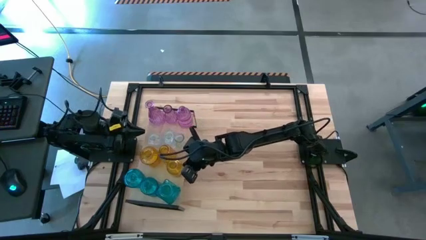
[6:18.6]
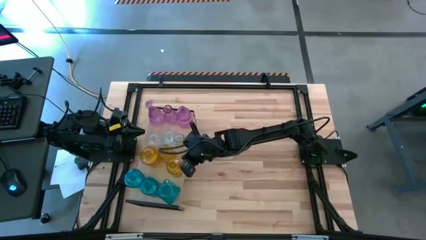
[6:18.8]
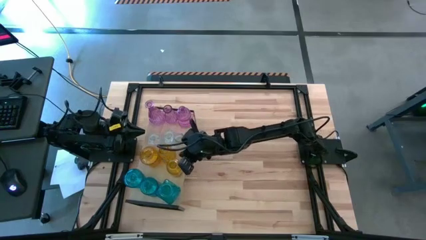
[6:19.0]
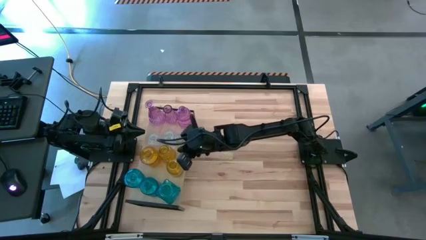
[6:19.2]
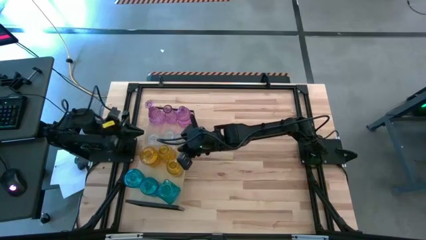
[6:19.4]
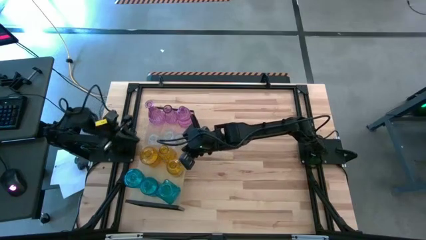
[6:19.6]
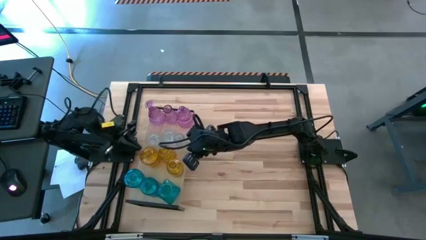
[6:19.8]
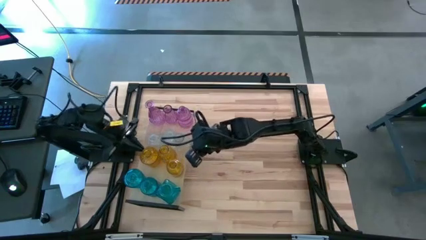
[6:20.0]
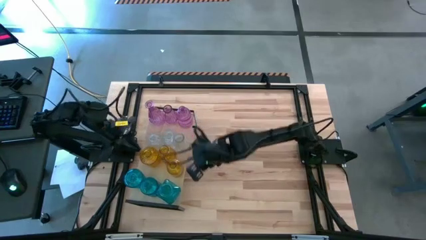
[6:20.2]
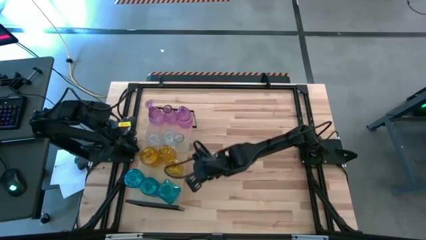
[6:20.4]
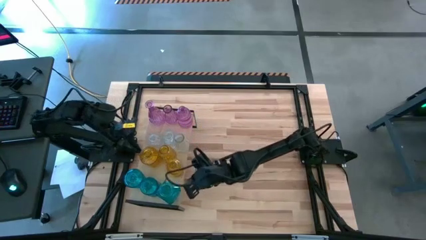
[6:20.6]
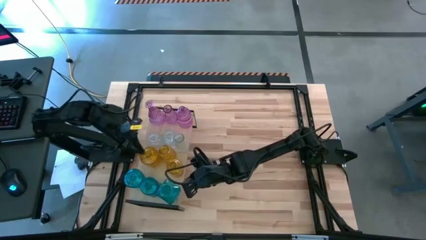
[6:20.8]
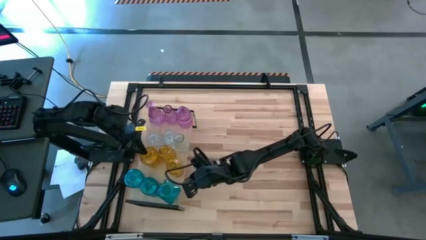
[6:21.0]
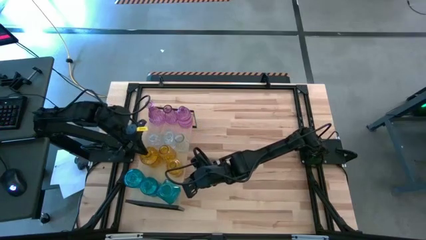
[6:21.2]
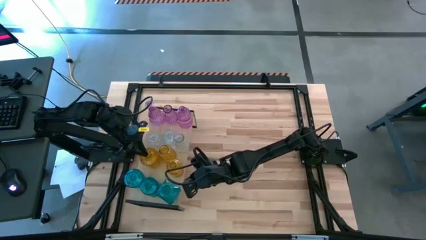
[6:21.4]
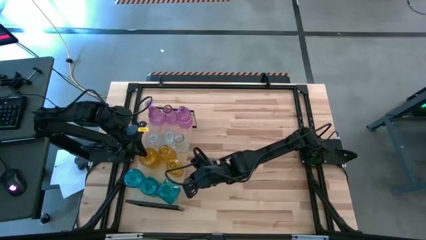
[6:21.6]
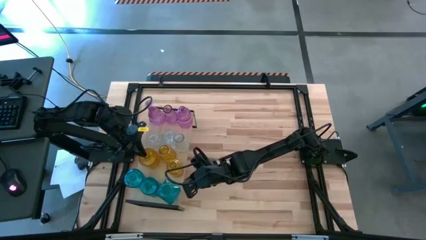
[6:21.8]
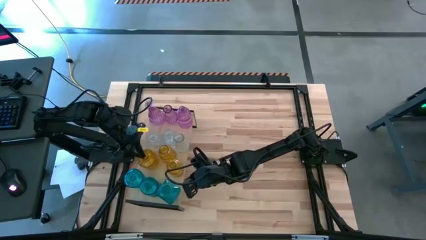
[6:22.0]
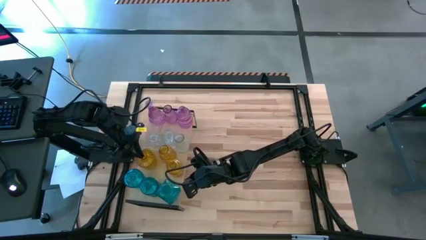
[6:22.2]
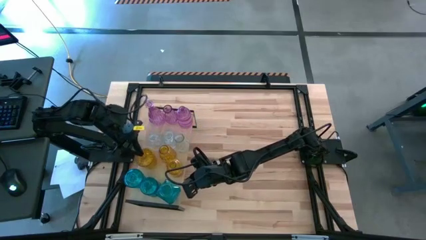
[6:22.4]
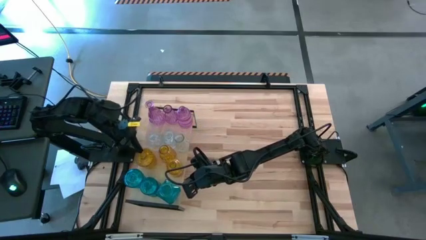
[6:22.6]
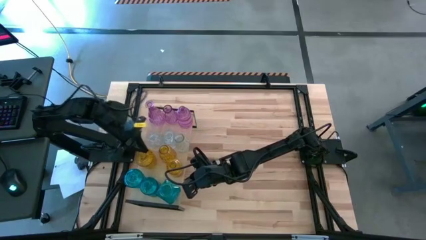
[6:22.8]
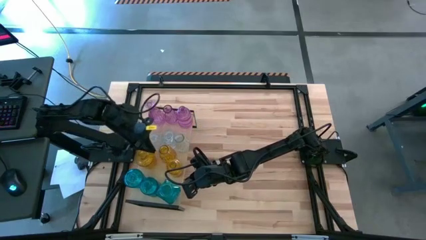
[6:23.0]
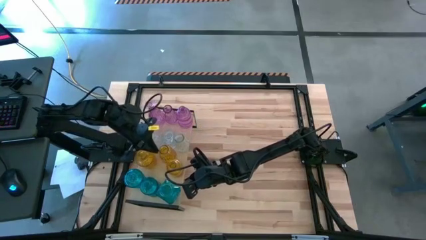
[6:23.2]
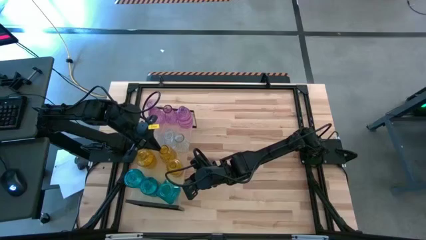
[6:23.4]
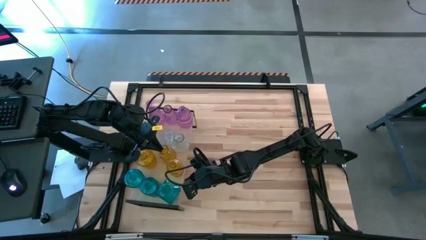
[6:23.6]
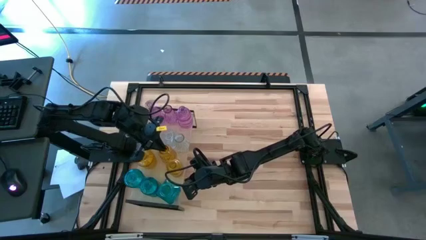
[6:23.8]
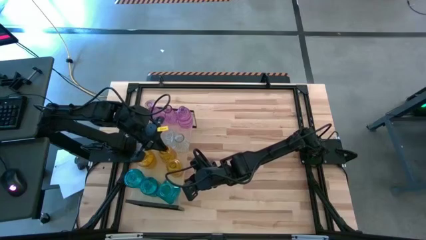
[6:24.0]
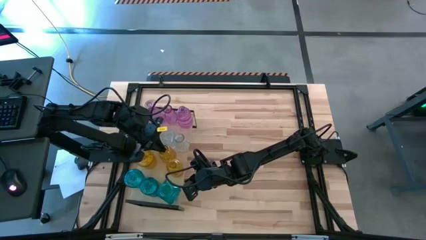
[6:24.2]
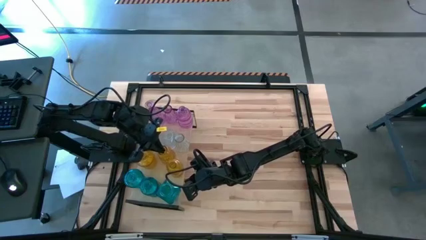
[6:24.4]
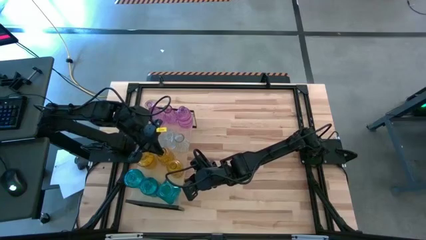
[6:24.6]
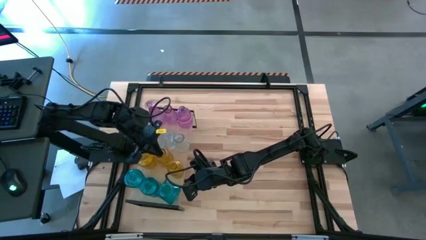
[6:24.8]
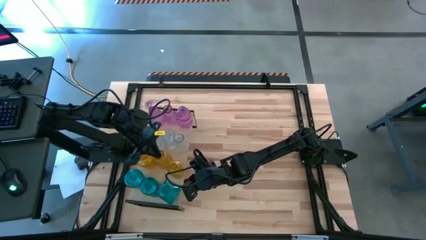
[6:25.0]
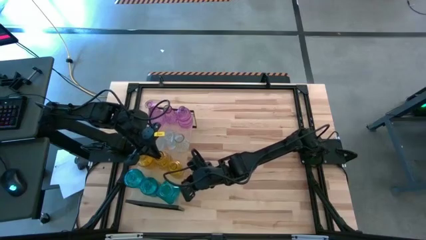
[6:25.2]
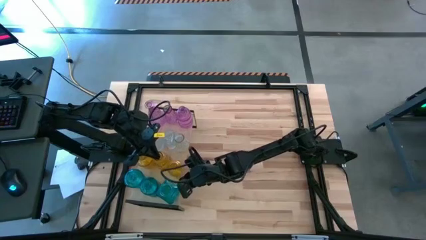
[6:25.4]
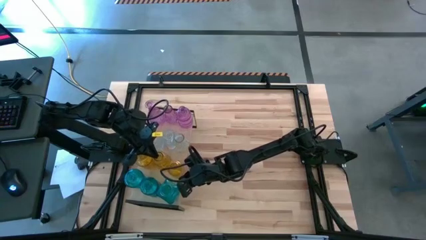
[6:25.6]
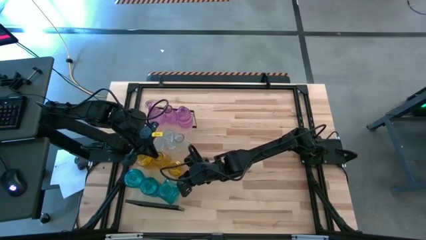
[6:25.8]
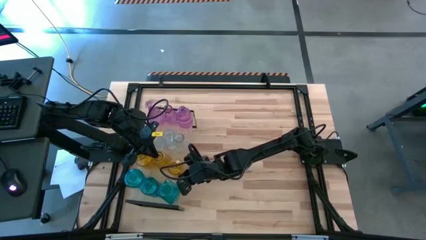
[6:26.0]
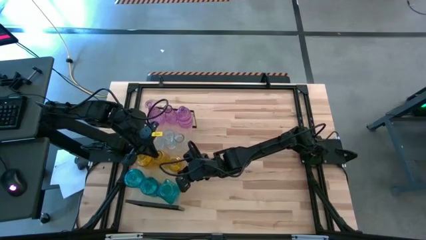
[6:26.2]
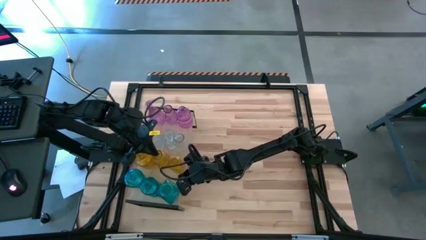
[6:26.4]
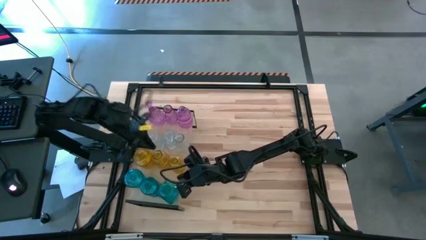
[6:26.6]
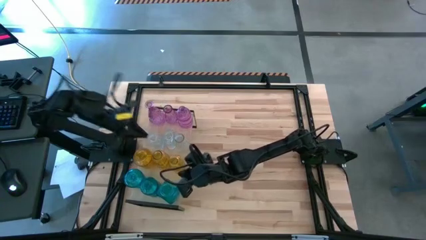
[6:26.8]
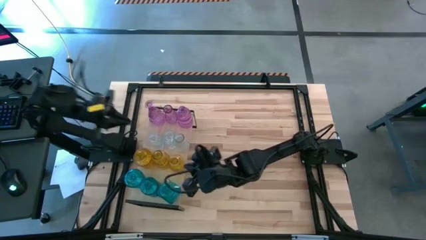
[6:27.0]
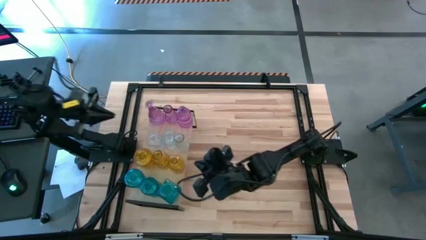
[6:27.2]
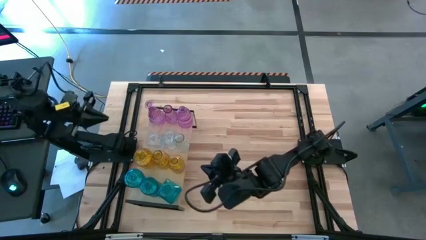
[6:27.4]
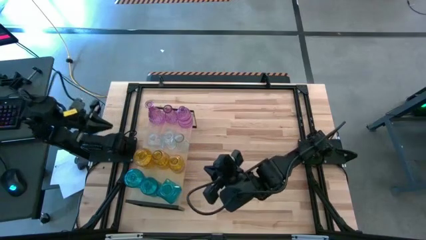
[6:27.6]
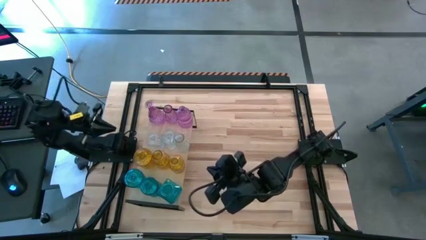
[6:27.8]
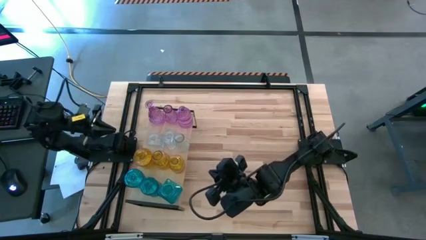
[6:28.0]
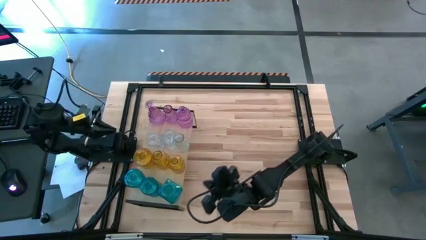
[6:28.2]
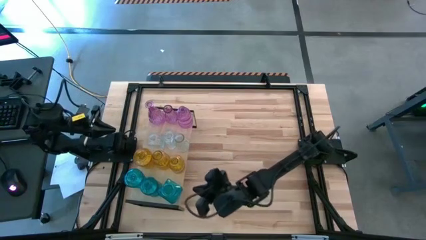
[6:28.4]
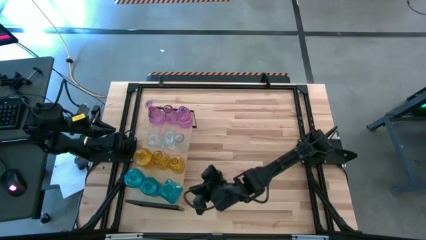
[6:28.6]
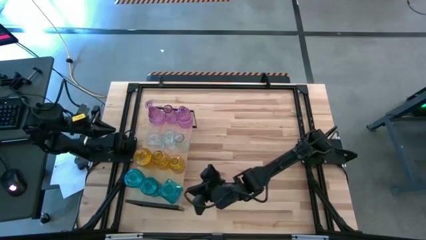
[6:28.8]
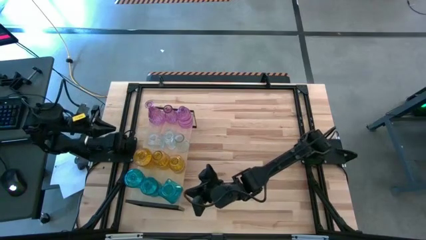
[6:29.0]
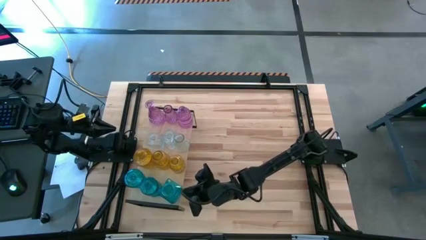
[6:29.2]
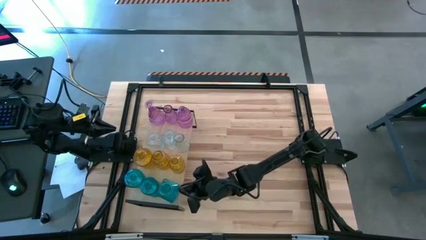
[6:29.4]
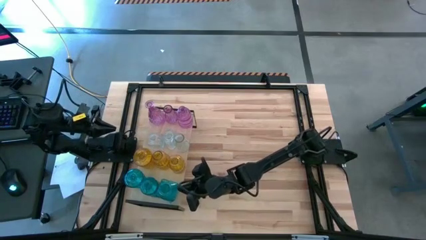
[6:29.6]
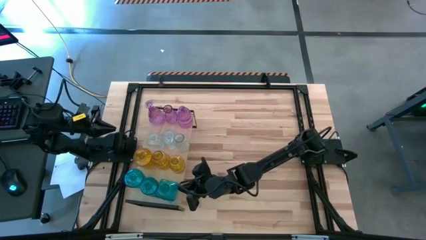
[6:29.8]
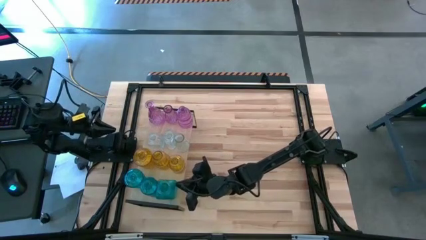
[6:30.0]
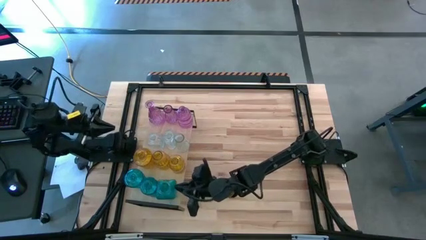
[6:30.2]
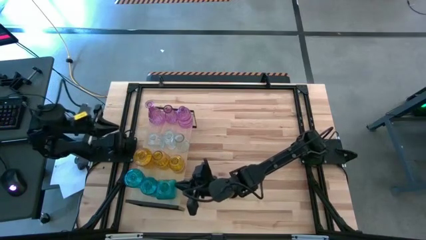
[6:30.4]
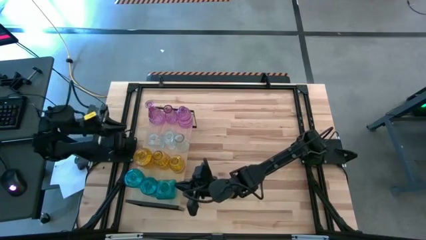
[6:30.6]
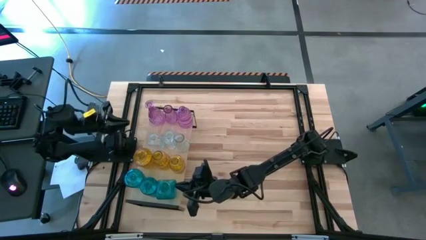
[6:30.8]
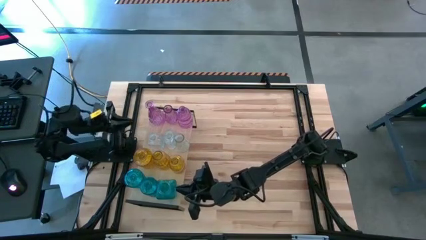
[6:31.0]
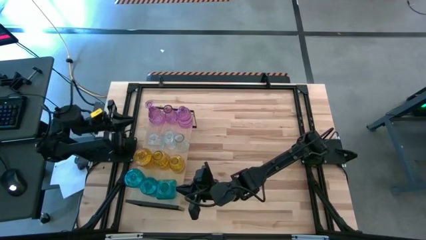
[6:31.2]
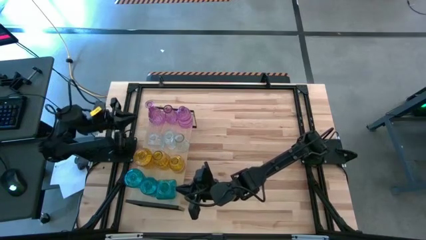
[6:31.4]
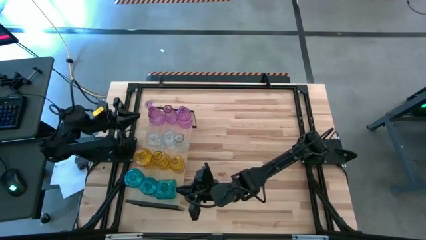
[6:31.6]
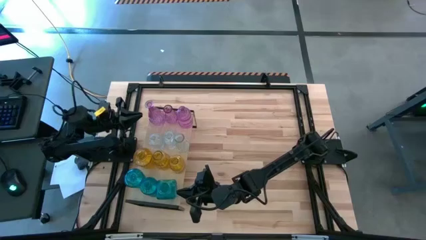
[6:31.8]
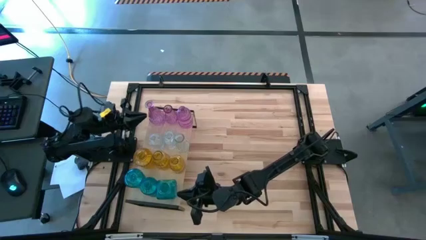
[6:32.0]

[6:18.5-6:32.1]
Task: sort vases onto shelf
Adjust the blue flower vase on the shelf
